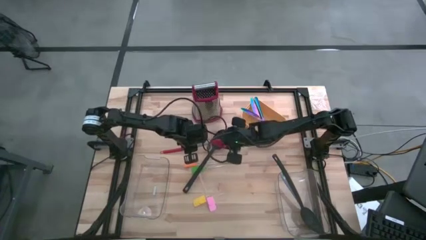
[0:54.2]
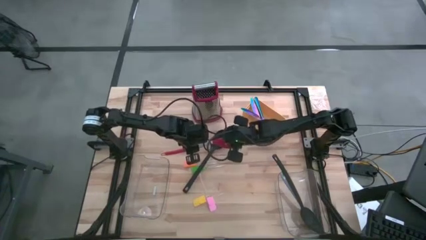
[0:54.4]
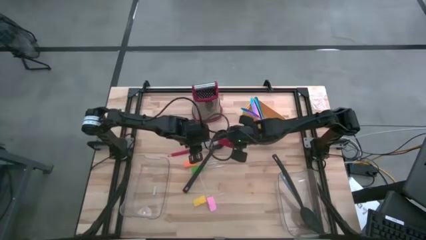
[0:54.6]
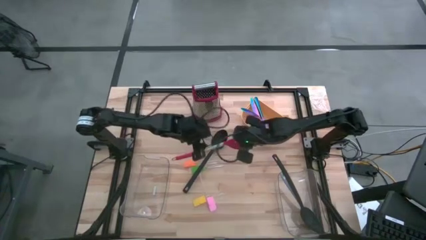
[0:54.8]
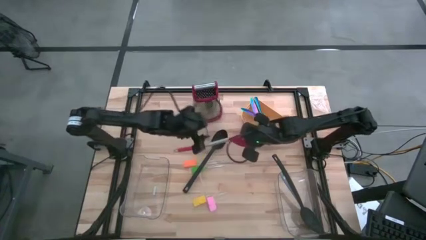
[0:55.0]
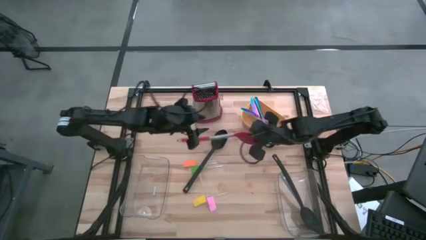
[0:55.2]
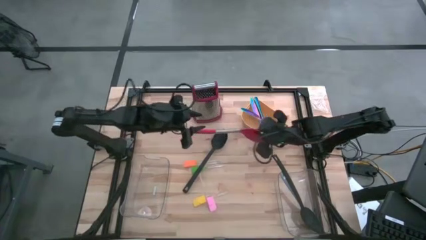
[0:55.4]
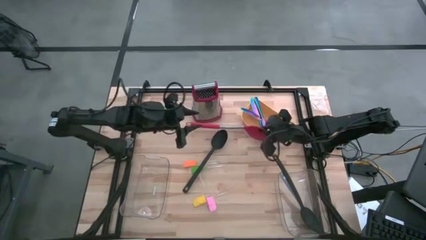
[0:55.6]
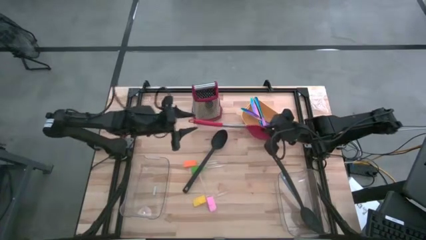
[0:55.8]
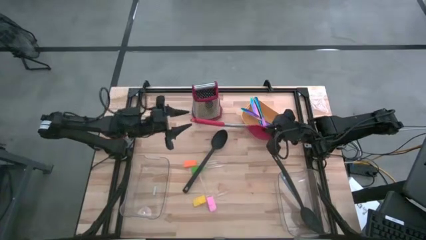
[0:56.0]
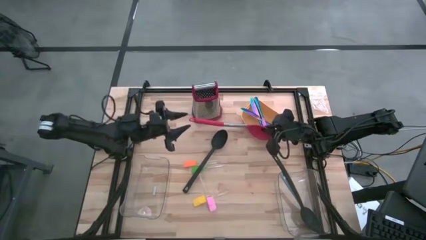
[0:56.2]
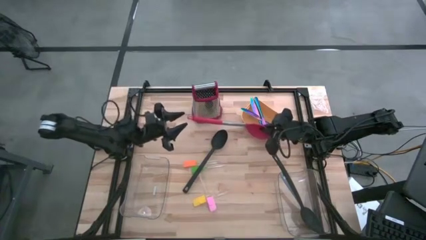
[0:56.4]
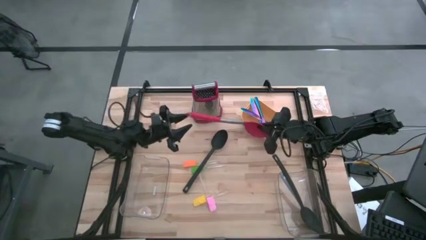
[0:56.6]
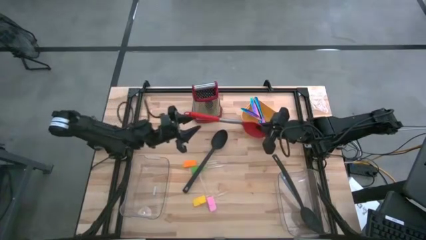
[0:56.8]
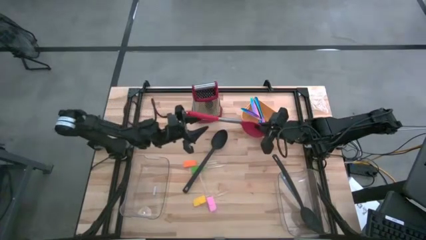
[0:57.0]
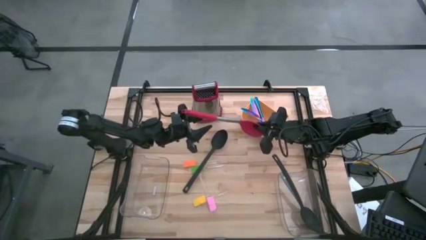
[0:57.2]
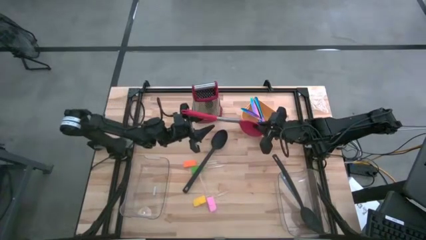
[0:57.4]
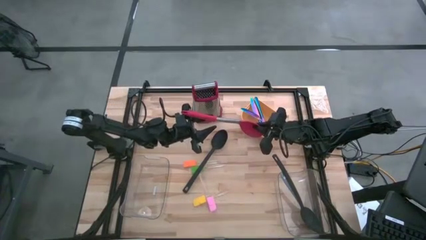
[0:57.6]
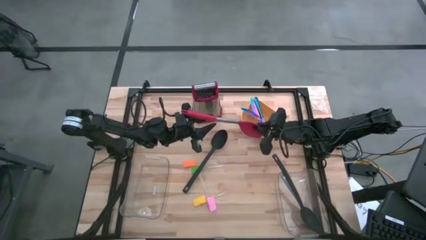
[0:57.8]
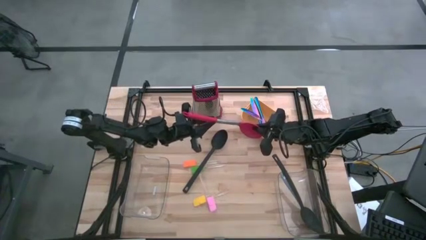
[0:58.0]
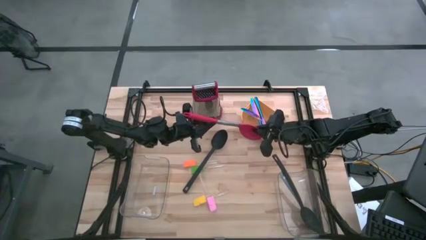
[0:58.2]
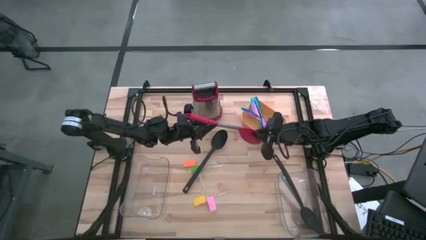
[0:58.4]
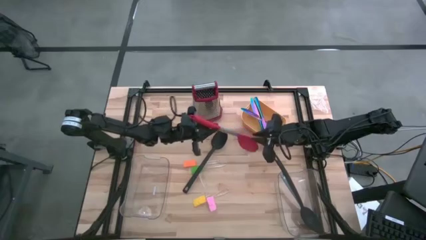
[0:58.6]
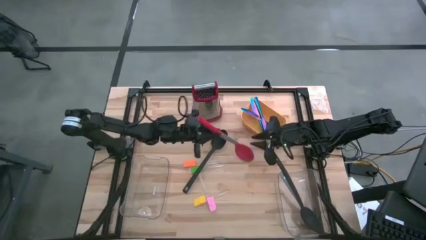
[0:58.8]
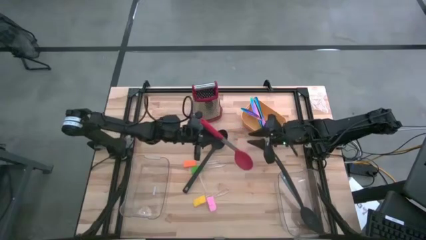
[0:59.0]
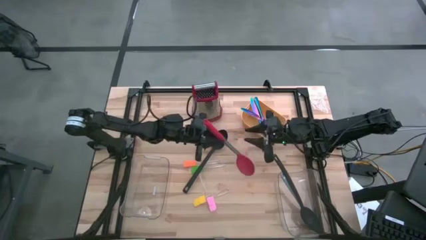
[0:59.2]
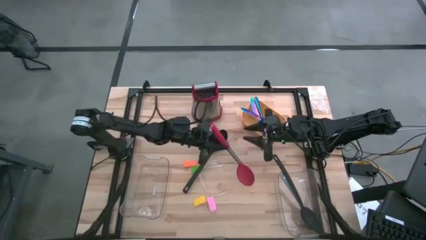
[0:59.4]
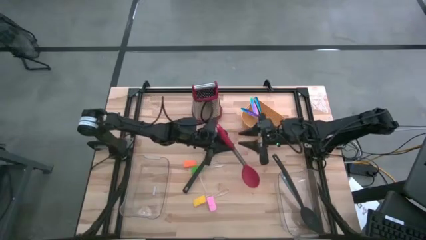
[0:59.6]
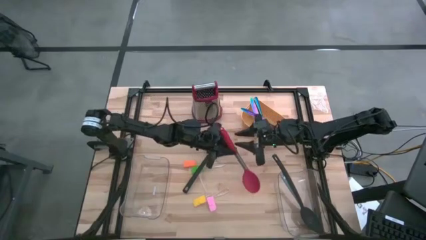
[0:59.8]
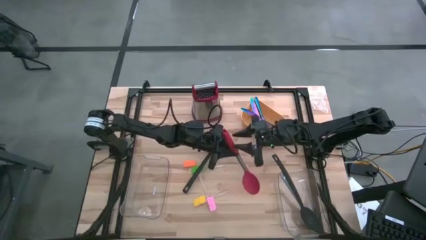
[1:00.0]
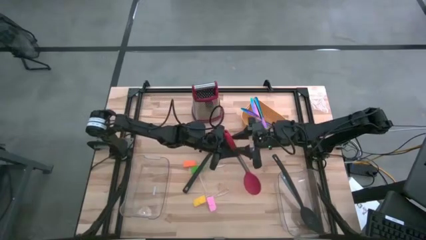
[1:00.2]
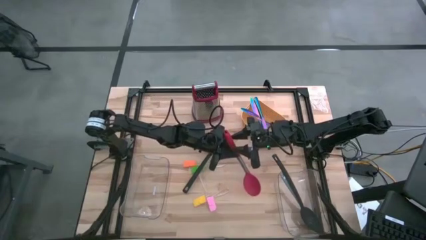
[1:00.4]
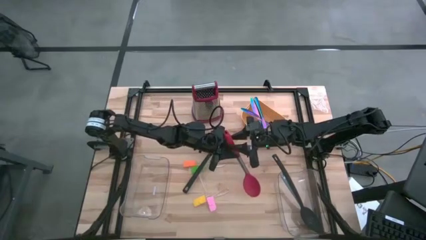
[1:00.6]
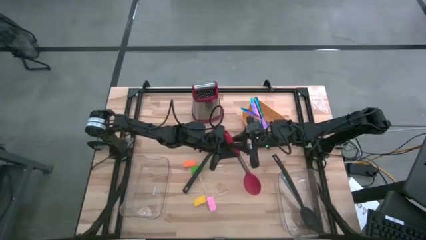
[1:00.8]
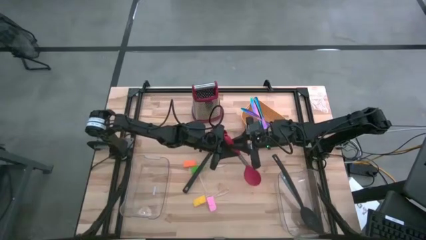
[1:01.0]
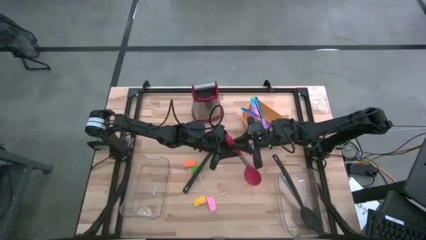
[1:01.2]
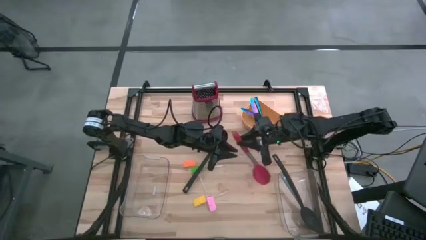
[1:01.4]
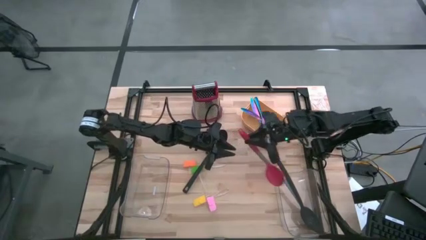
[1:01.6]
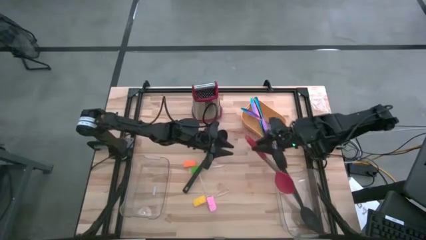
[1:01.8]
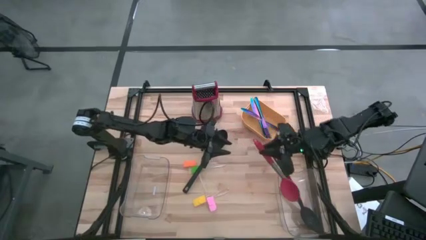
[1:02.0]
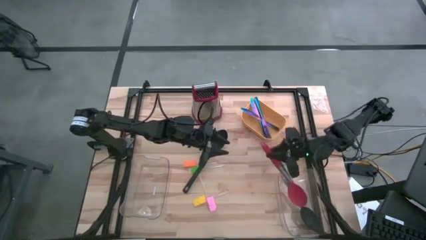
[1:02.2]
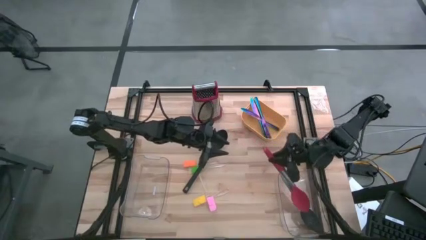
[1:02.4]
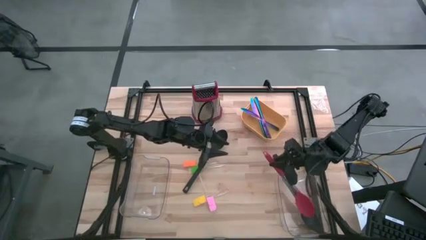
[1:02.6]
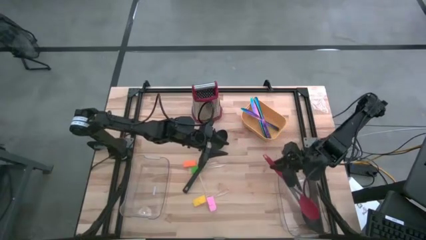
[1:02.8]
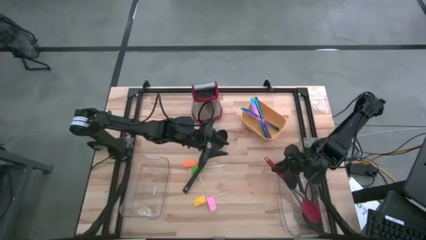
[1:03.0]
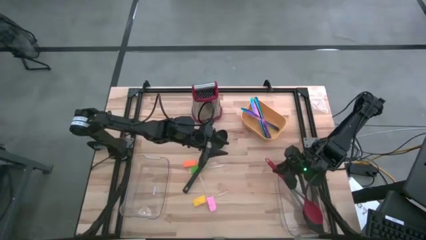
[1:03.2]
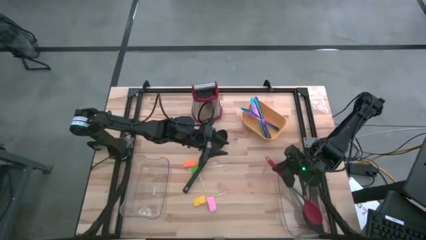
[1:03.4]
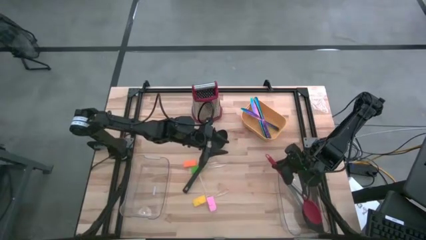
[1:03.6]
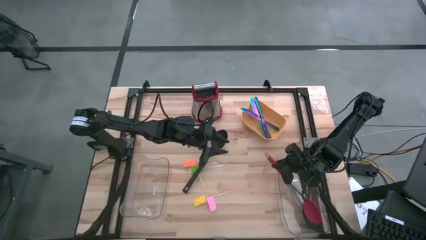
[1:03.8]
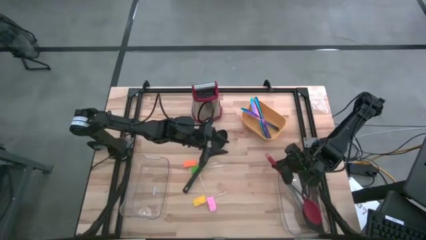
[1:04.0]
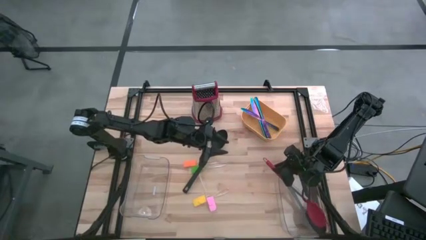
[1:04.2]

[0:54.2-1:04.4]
Task: Pick & Place Kitchen Items
Put the red slotted spoon into the right transparent bin

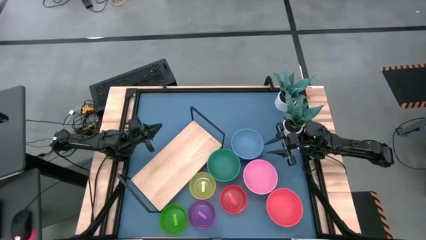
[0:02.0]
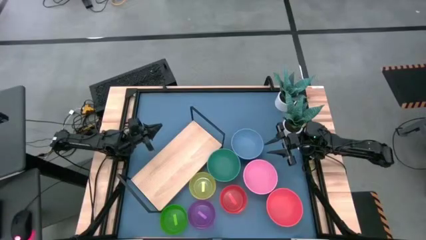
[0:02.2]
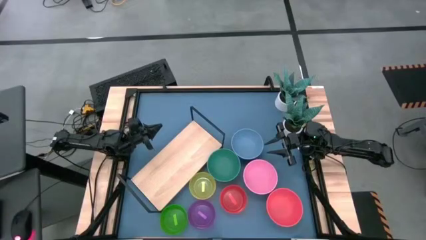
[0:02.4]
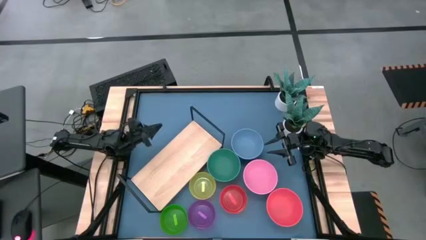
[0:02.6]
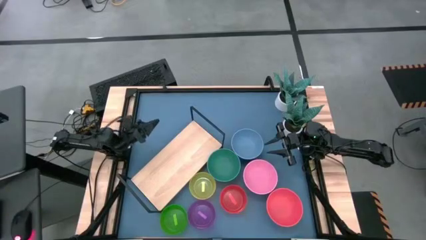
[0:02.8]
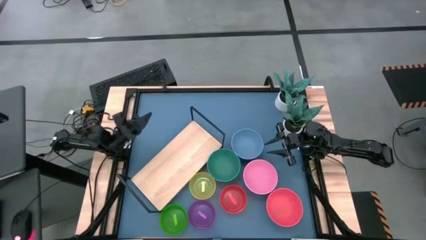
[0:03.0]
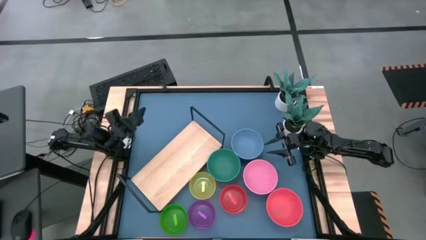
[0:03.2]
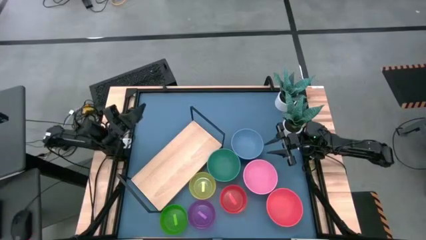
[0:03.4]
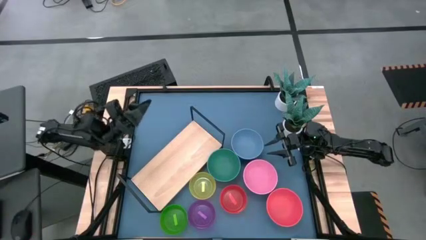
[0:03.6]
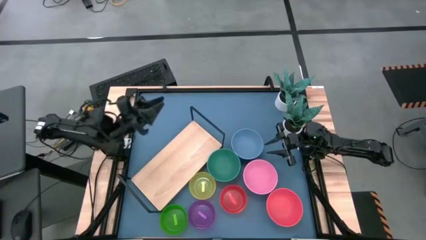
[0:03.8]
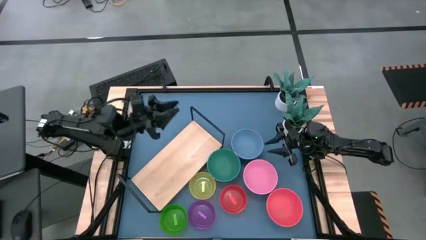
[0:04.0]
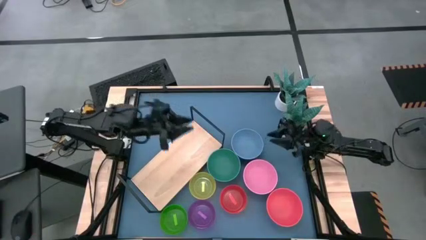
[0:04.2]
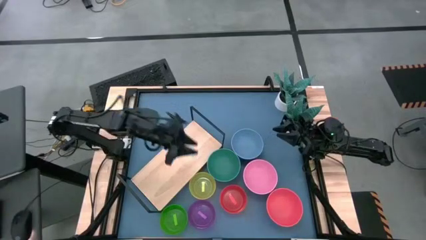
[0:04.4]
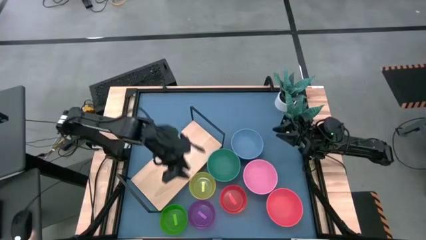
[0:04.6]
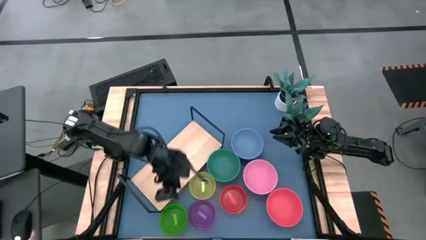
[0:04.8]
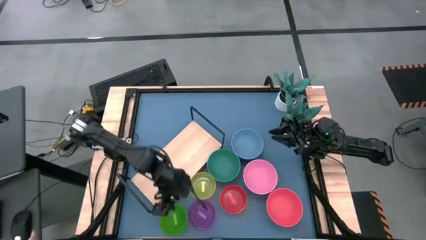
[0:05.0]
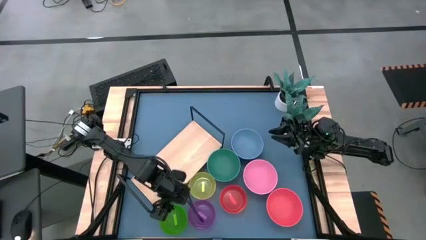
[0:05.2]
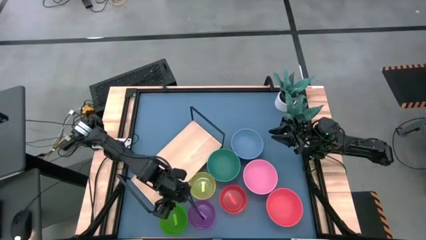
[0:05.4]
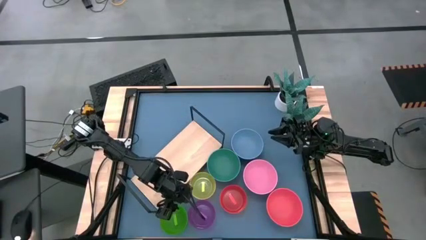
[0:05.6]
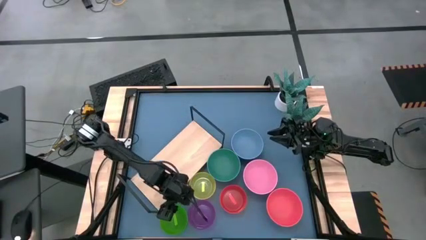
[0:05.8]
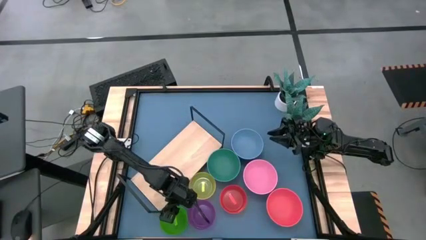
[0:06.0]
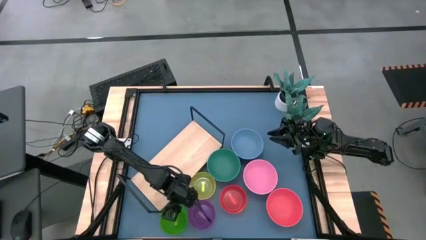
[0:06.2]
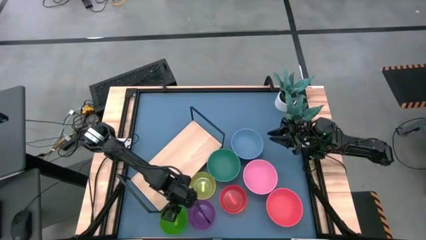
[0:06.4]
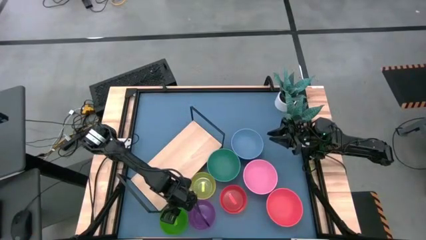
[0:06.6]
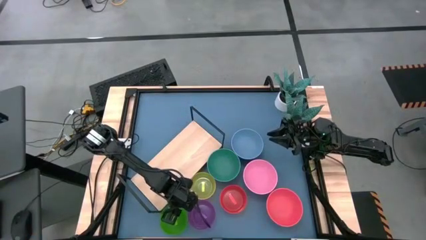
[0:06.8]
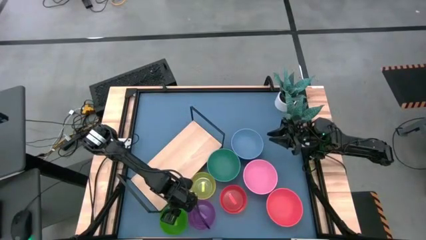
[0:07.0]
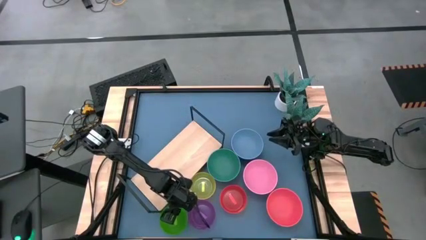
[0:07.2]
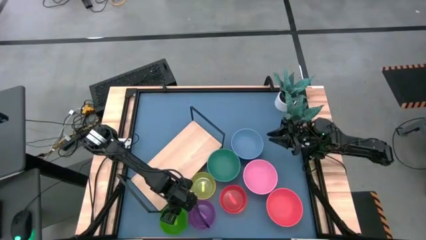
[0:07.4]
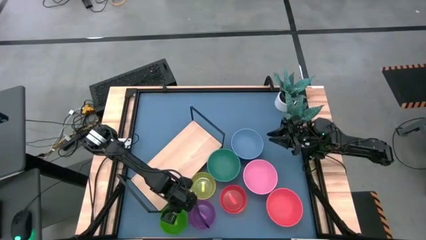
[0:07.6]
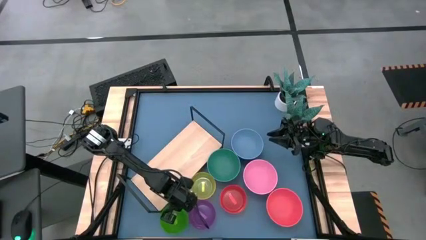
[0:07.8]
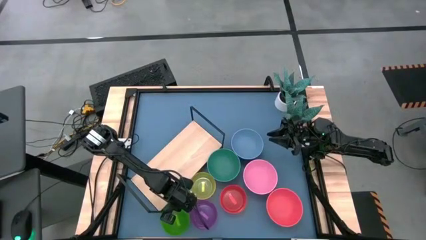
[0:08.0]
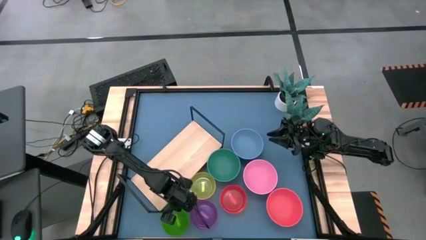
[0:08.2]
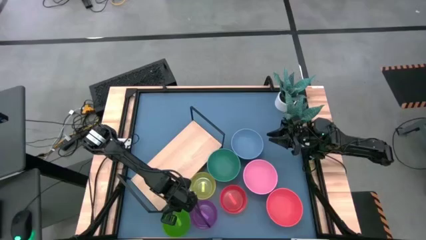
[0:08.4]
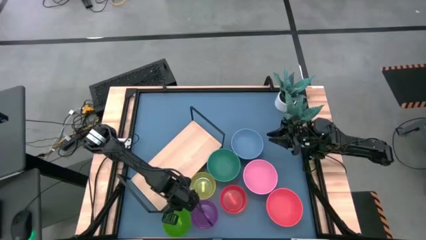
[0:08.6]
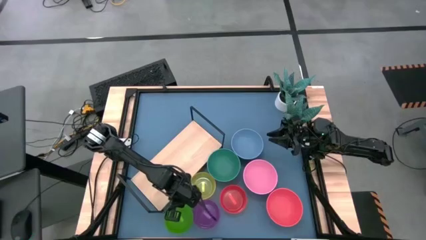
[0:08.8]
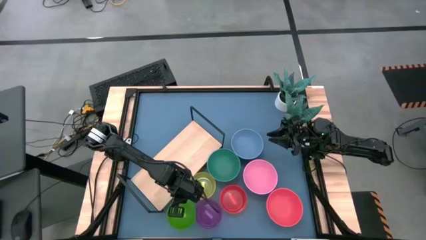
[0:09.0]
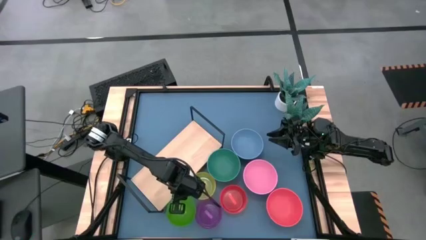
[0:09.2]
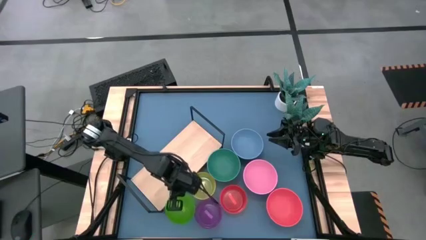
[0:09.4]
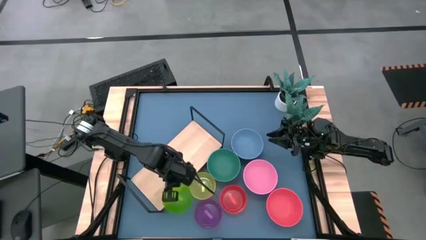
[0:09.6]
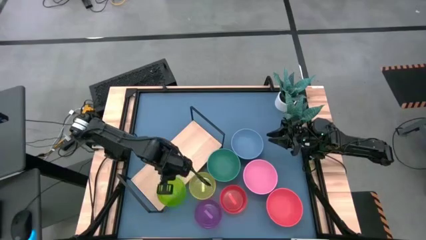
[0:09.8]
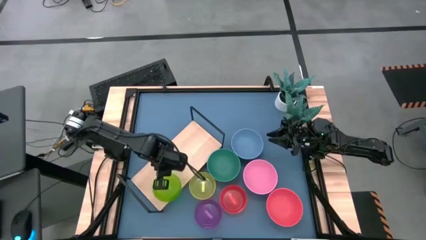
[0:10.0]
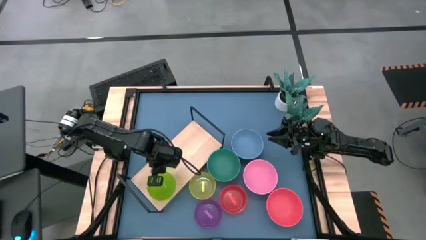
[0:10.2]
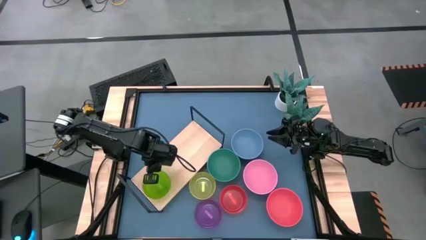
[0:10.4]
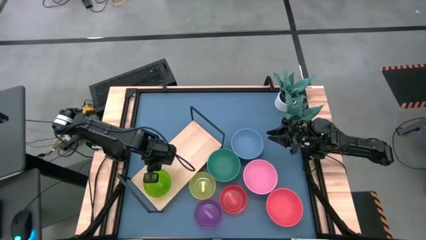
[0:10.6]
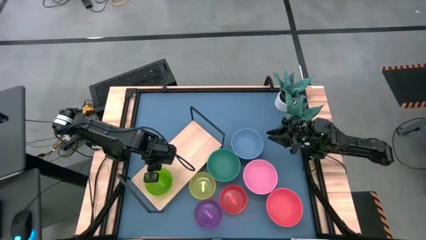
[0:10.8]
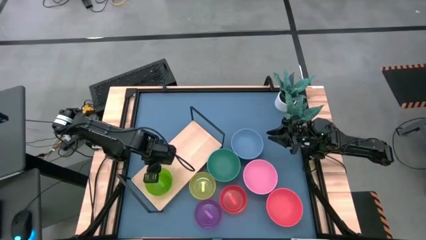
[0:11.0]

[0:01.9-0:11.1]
Task: Place and stack bowls onto a shelf
Put the small green bowl on the shelf
